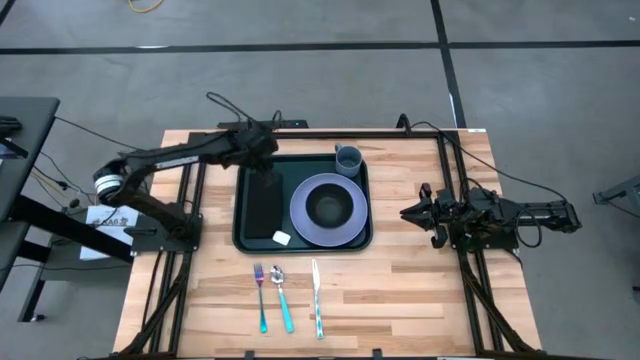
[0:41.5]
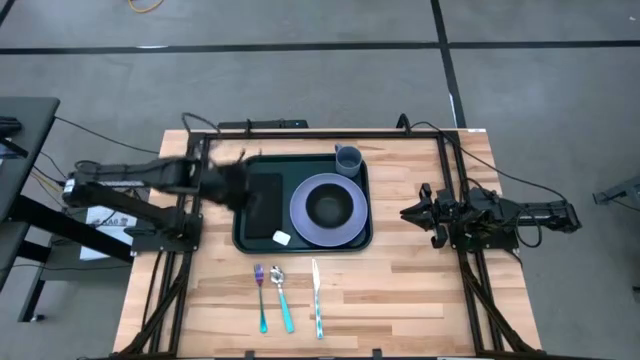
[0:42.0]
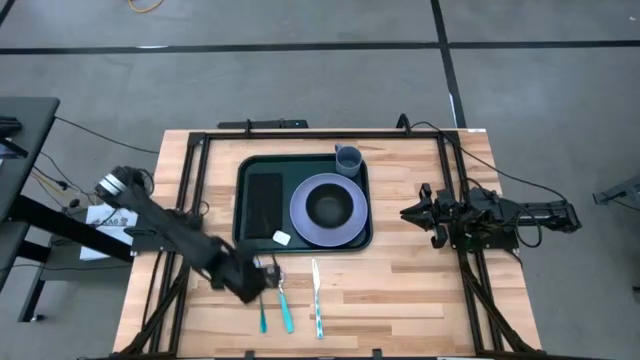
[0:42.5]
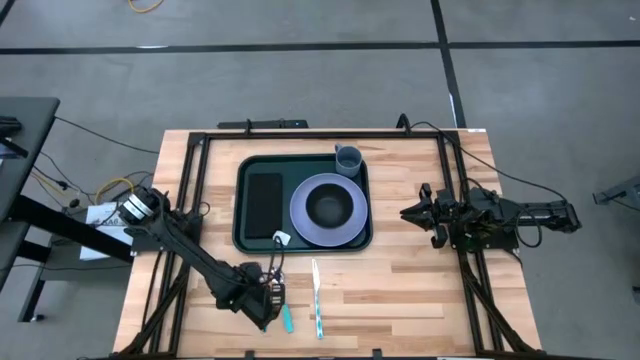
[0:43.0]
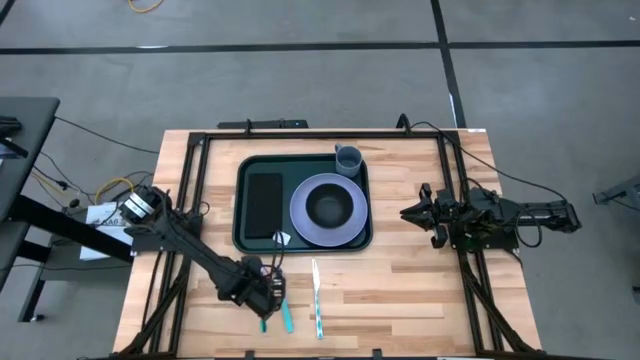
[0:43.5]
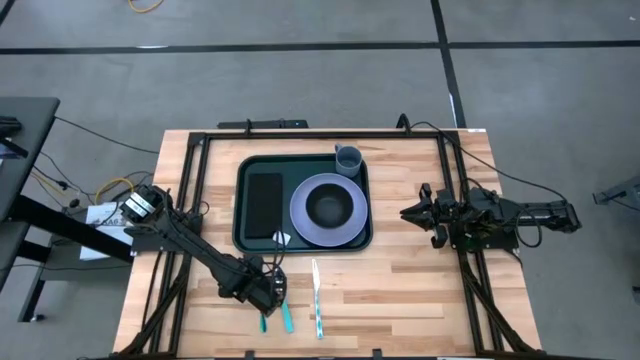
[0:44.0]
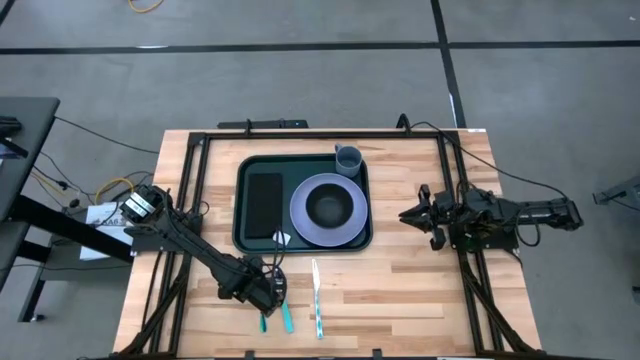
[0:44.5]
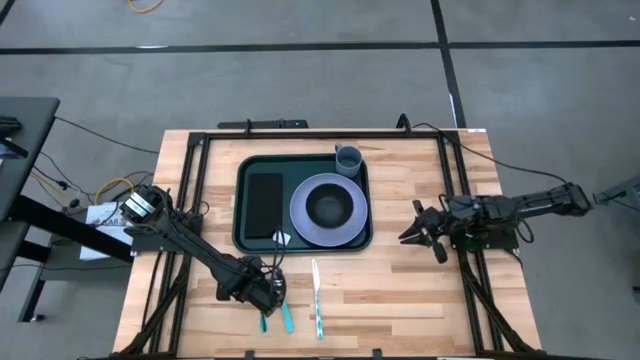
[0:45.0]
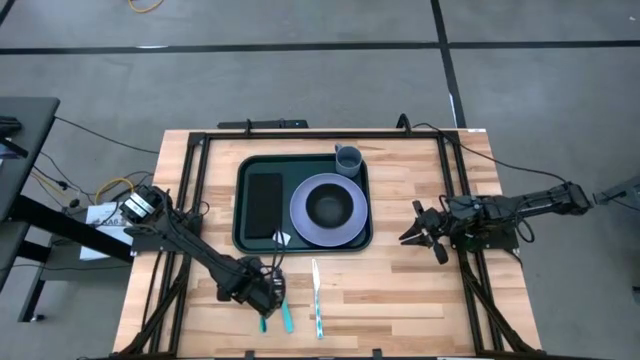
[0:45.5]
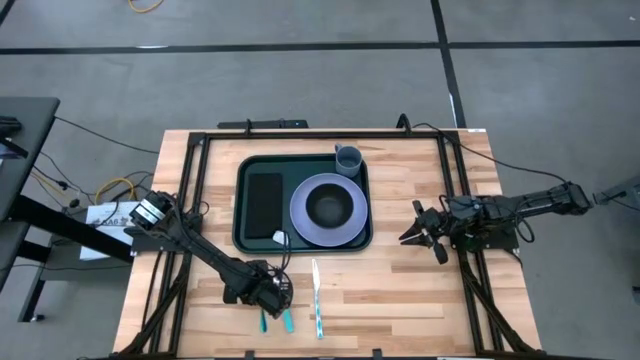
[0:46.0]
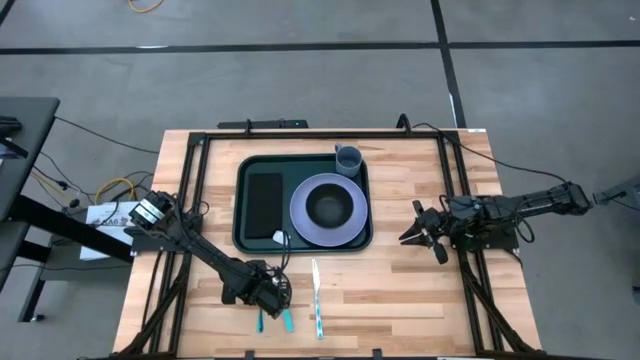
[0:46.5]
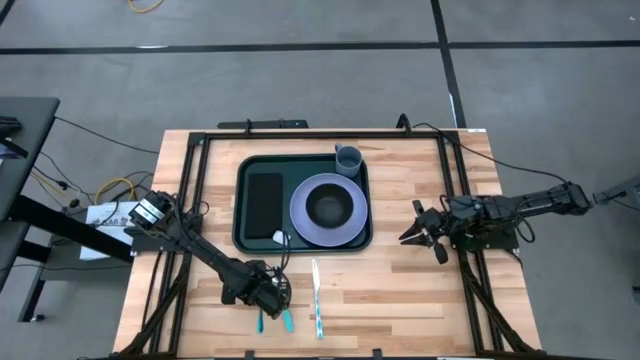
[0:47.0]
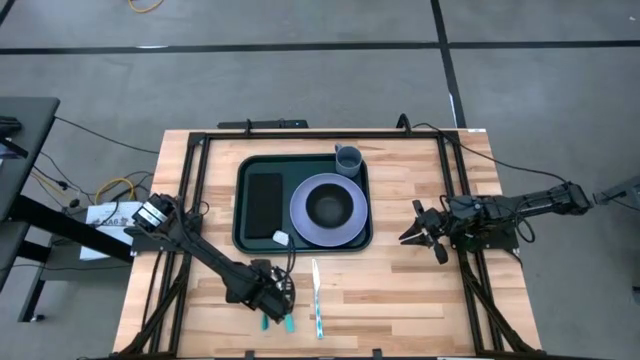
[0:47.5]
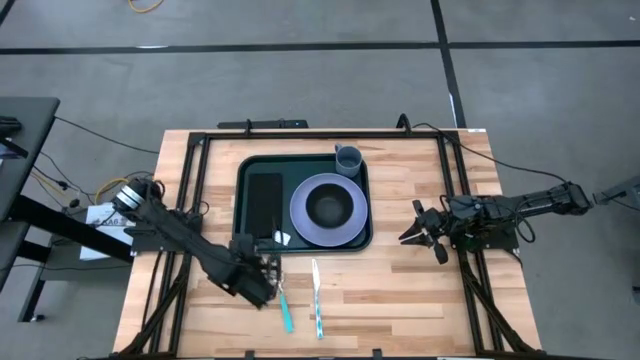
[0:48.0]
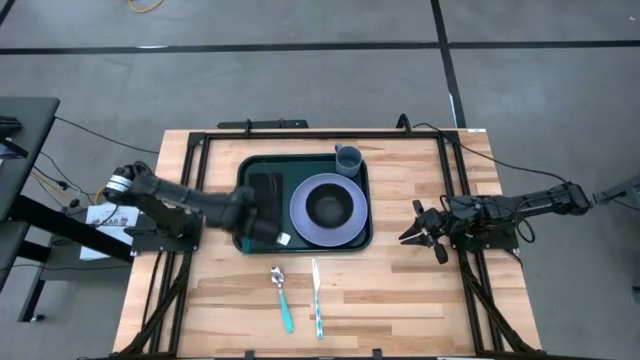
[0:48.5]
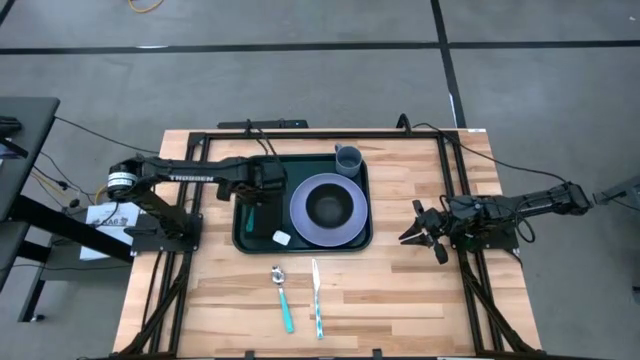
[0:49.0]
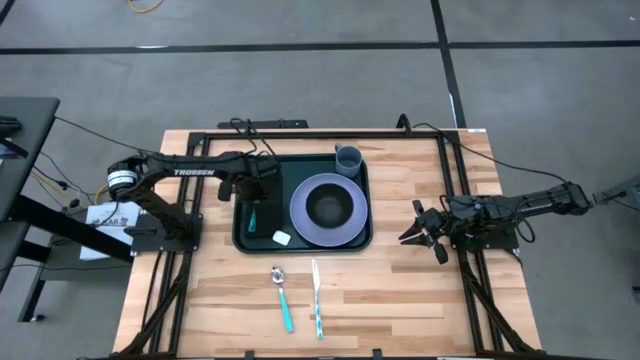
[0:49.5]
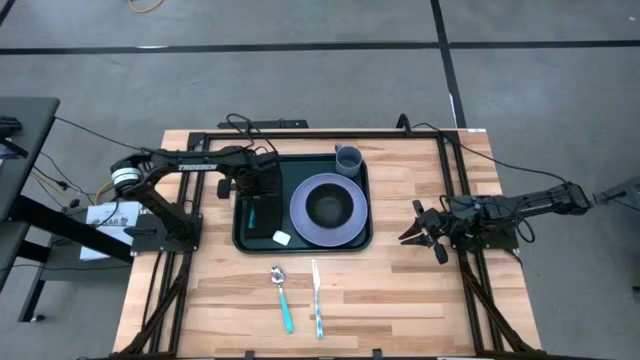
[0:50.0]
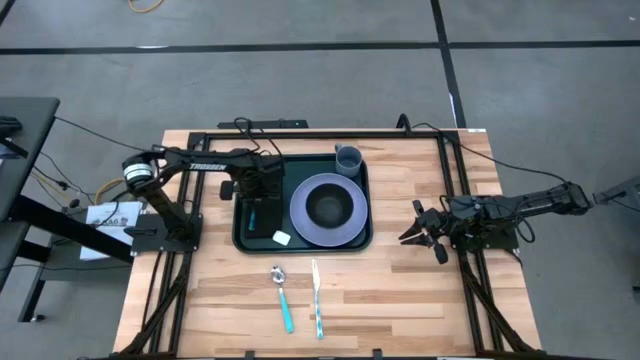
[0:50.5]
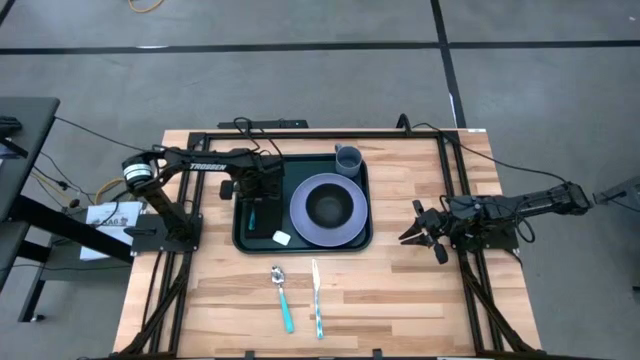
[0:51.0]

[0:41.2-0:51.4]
Task: Set up tray
Put the violet fork on the black napkin

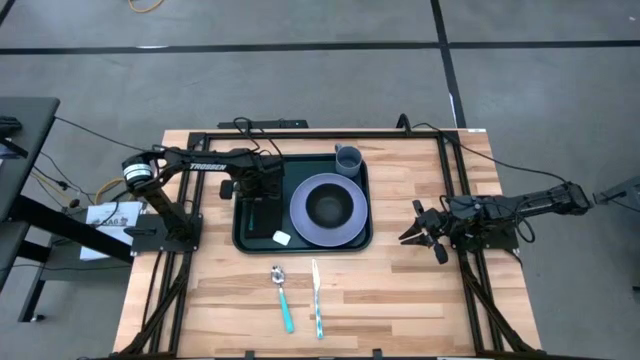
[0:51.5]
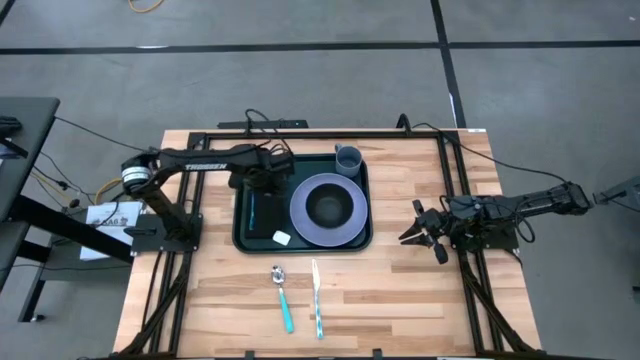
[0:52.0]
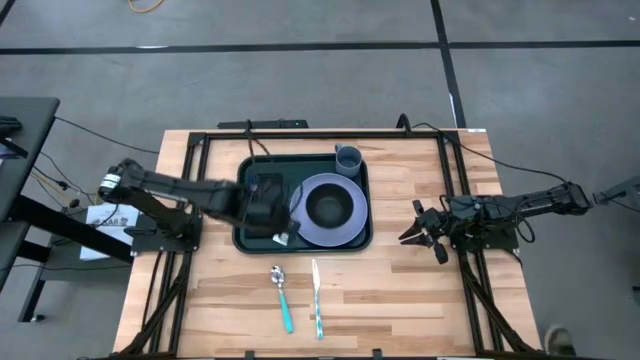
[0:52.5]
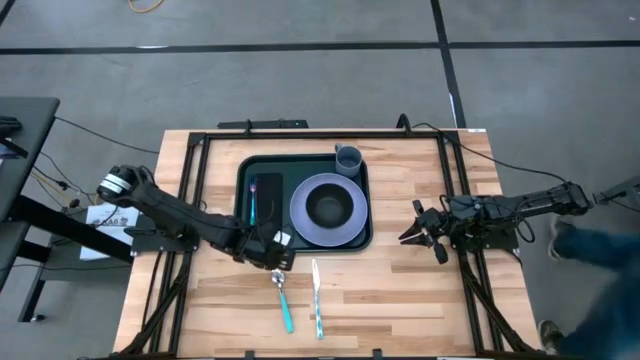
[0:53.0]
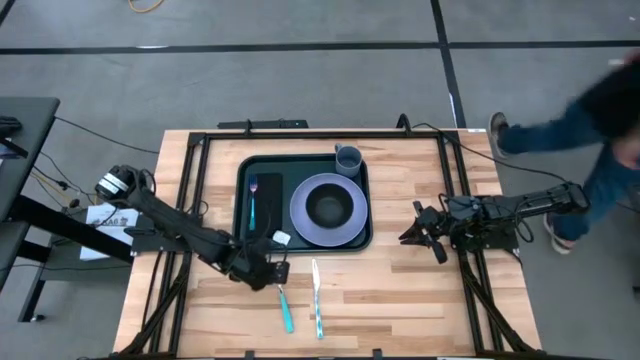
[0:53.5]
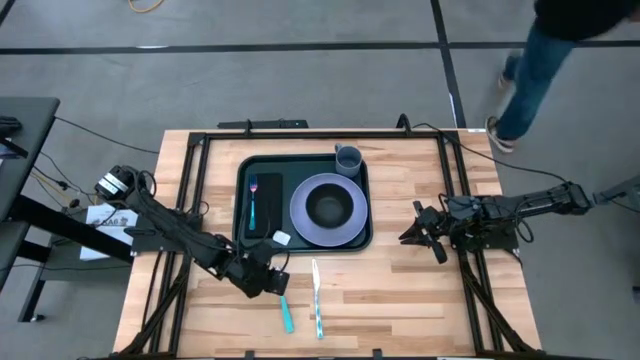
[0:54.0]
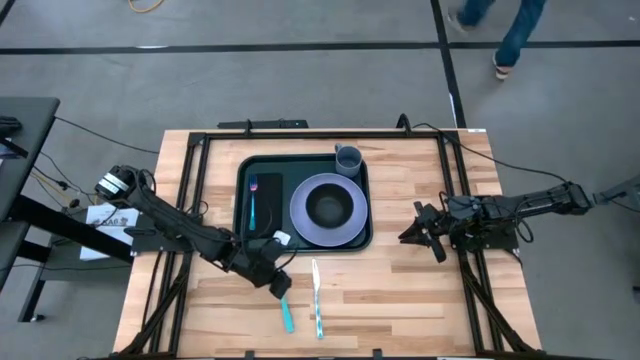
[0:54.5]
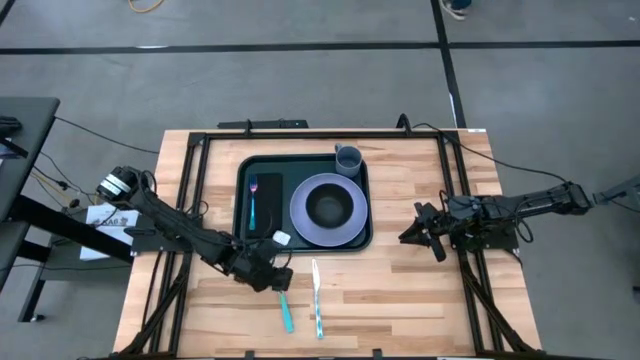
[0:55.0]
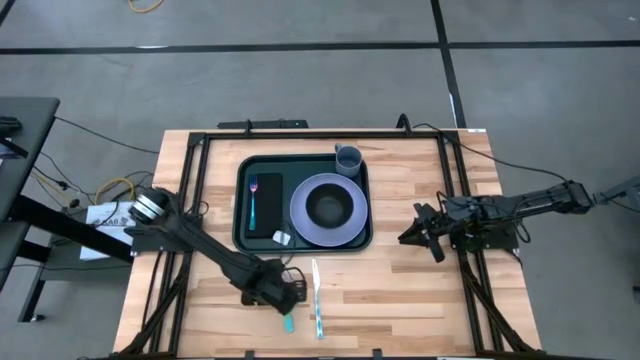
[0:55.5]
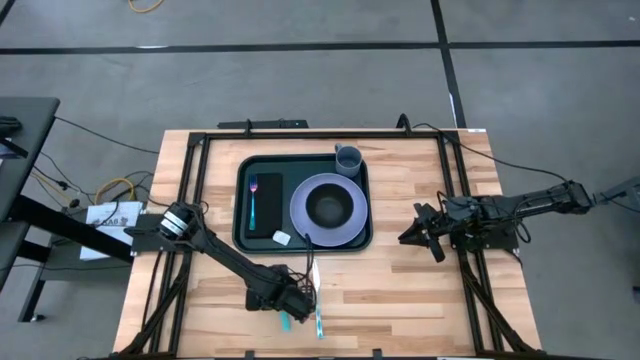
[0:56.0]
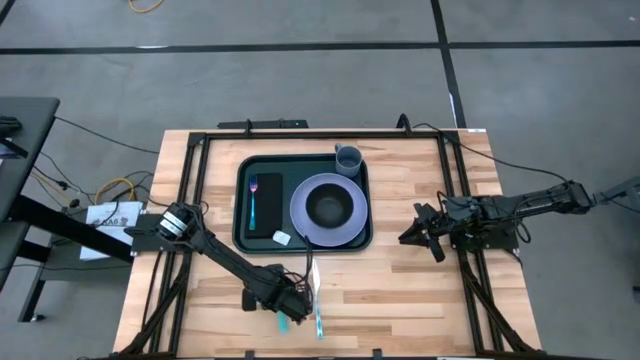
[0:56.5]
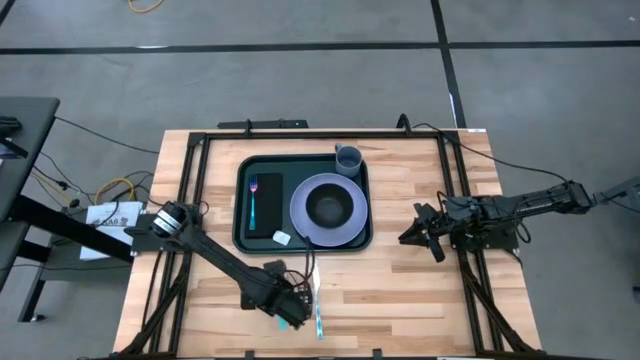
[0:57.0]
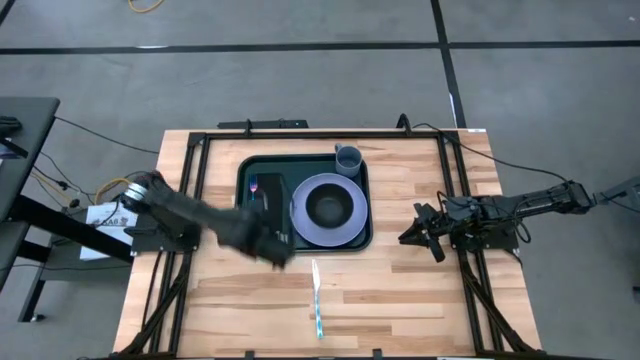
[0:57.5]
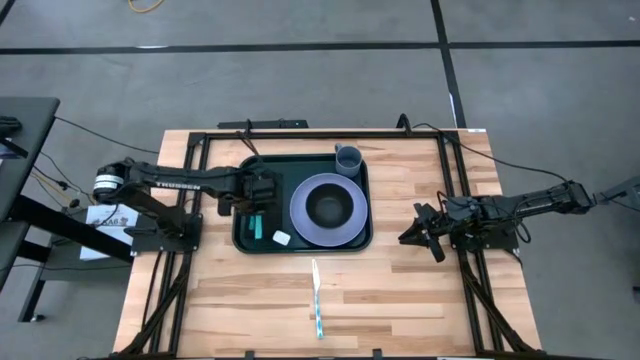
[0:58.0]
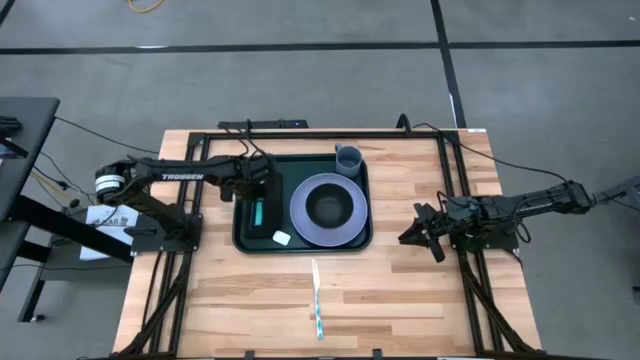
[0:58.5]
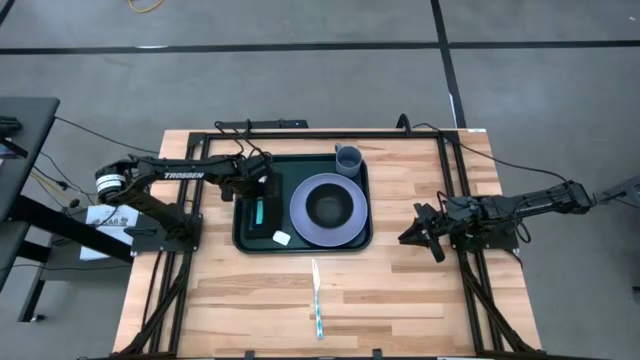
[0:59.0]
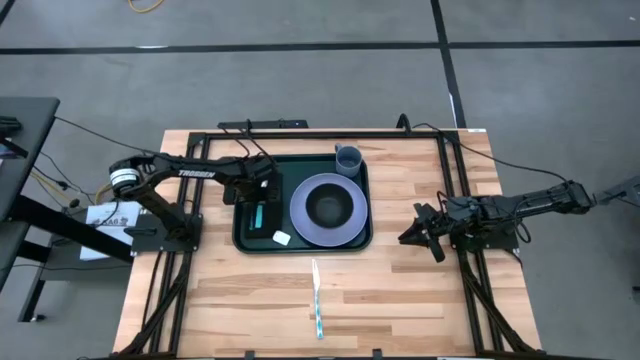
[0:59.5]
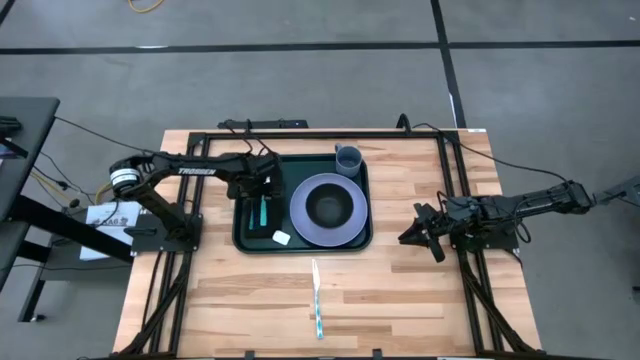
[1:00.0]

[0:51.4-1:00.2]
Put the blue spoon on the black napkin to the right of the violet fork
